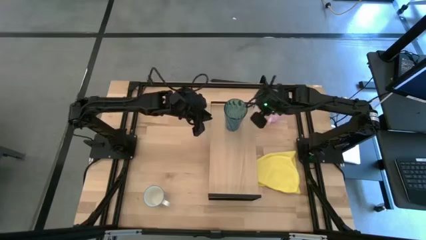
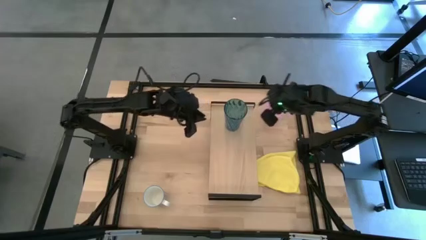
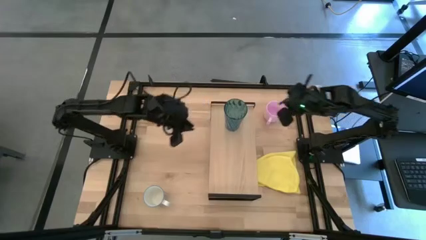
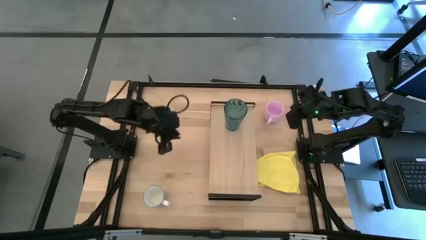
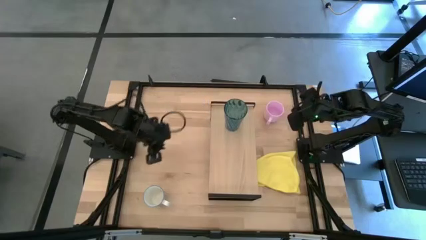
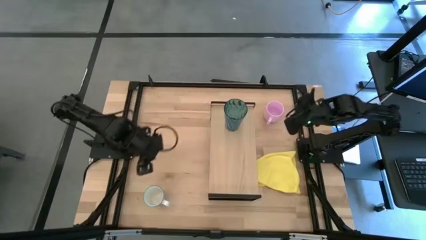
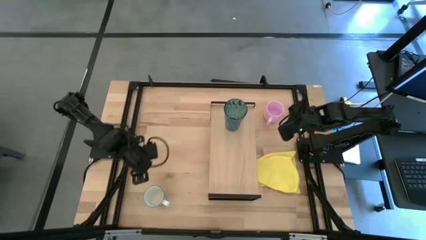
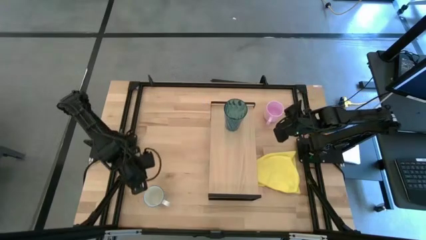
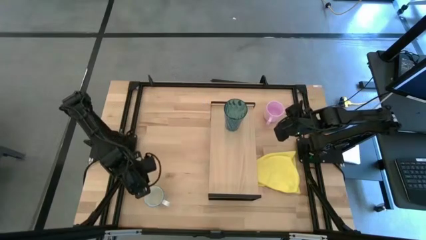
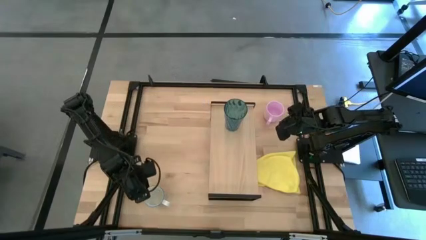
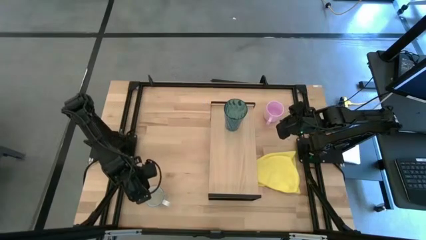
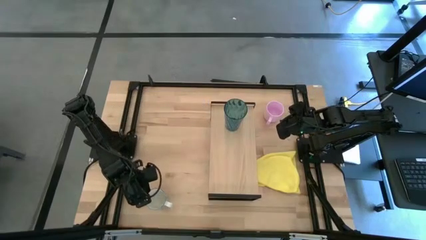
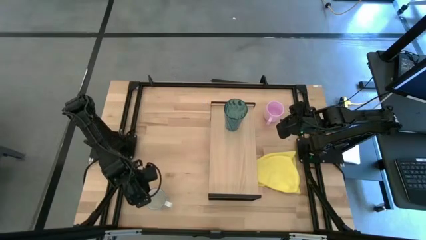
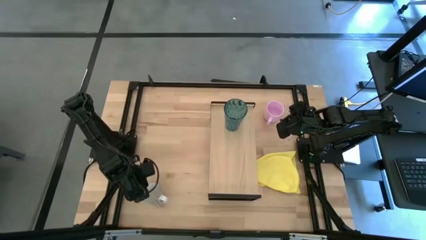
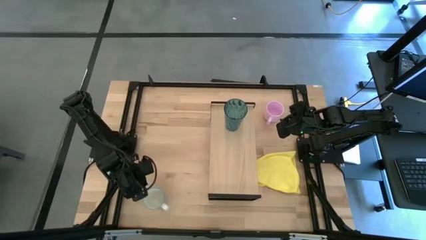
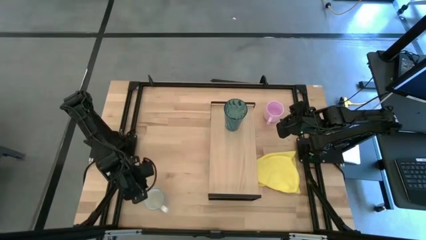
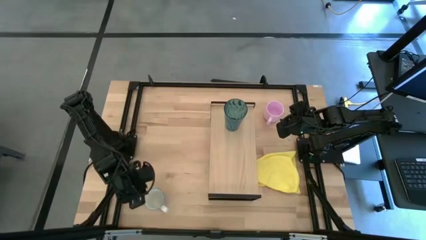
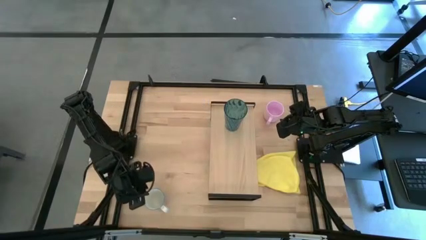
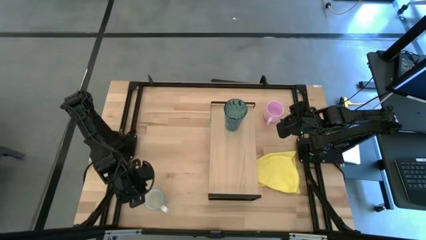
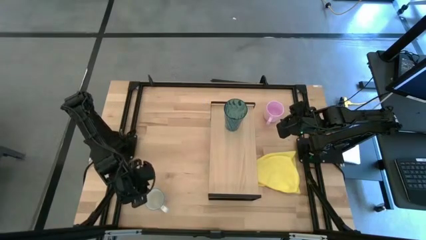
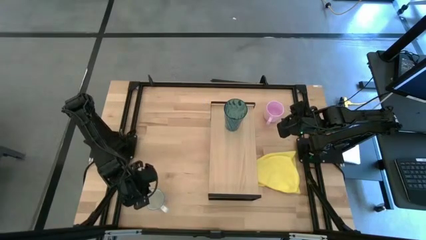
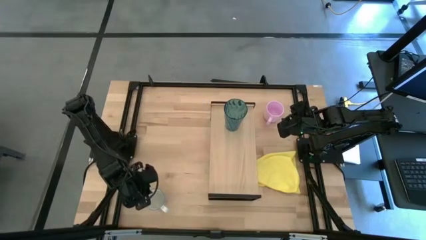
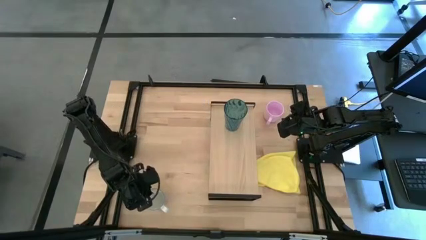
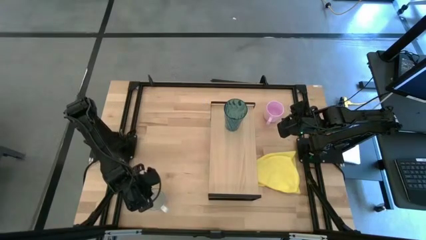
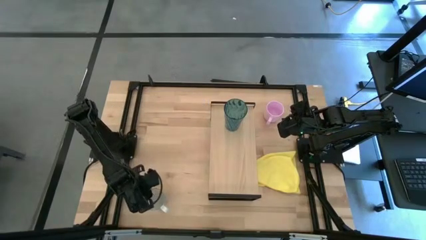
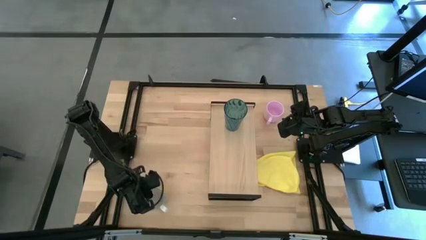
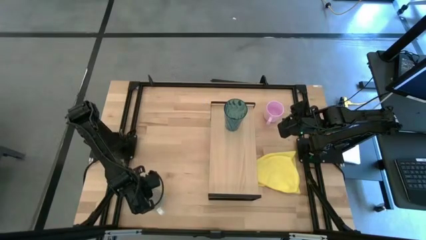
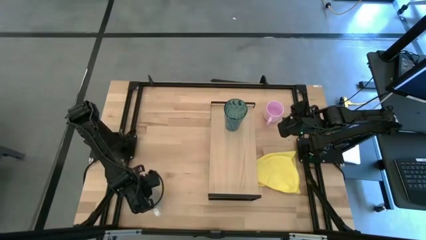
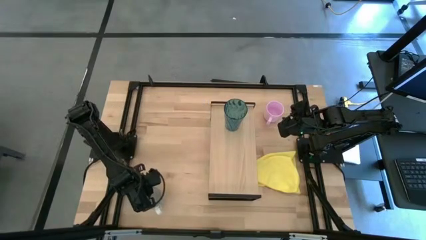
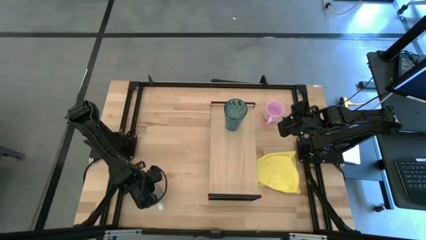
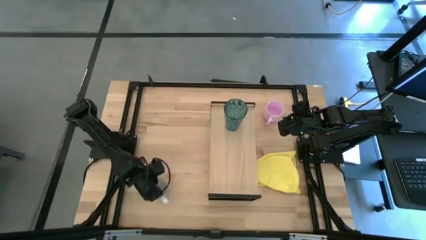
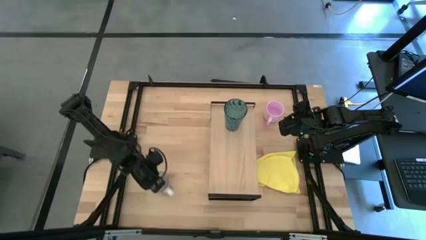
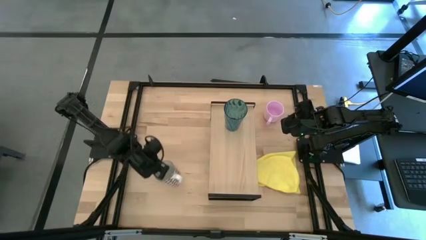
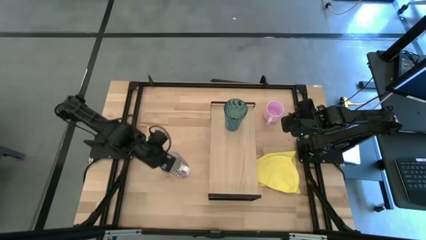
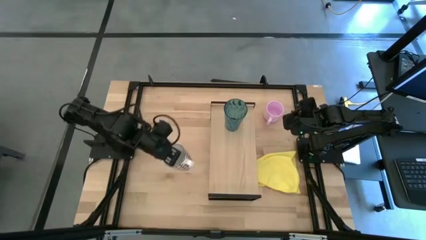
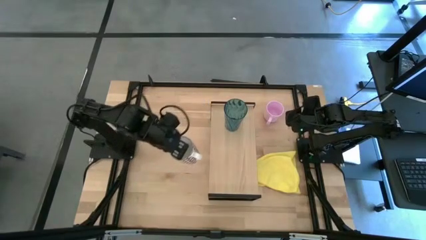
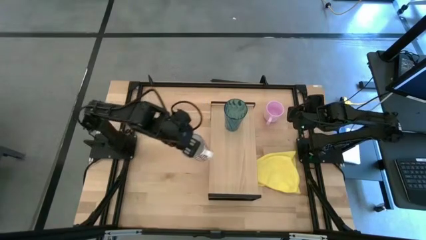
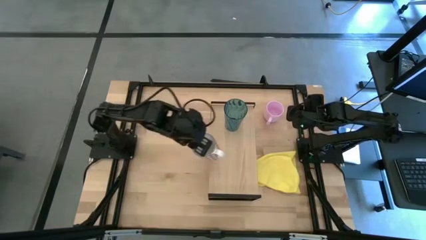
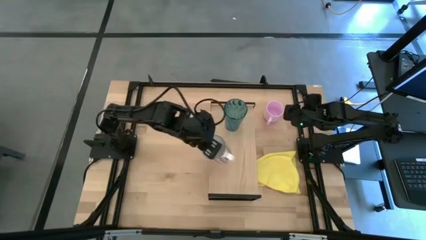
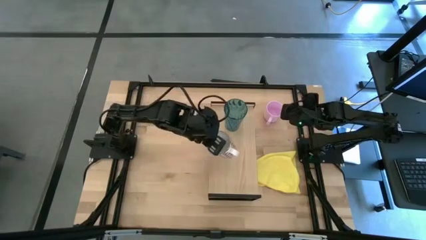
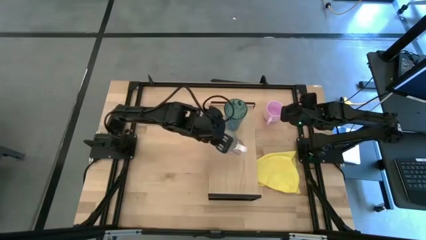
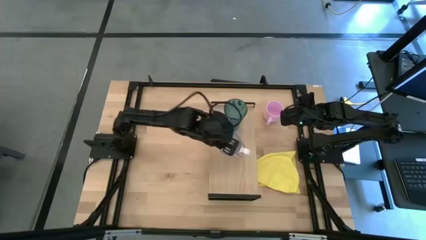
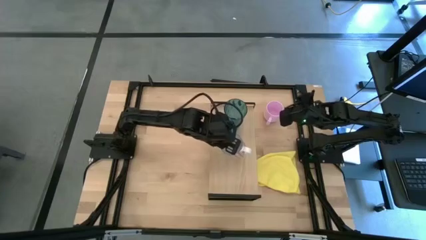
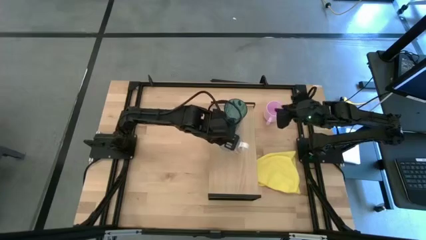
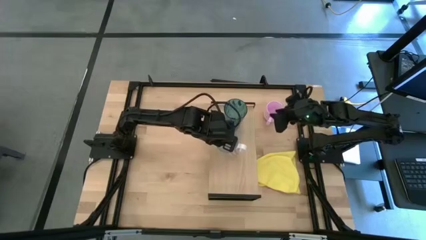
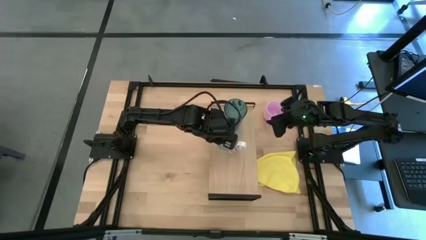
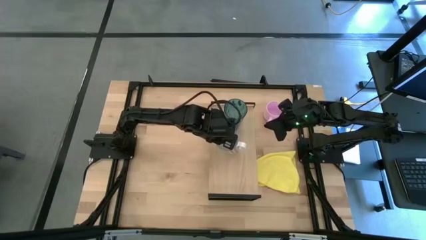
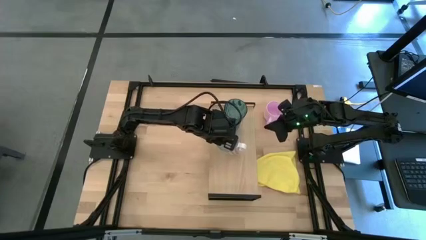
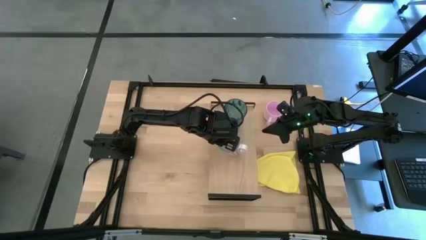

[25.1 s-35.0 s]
Task: Stack small to large cups/mugs on shelf
Put the white patterned mug on the shelf
